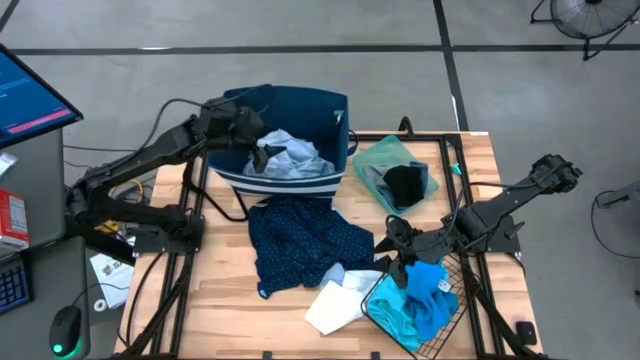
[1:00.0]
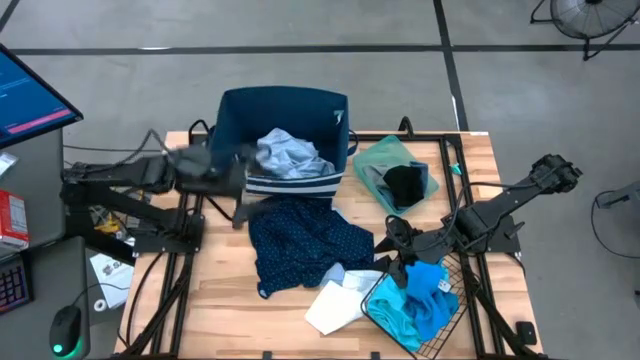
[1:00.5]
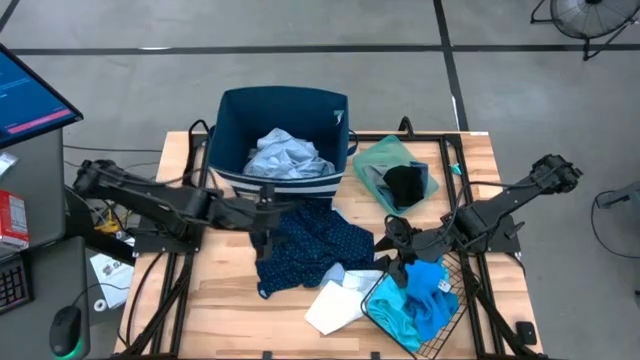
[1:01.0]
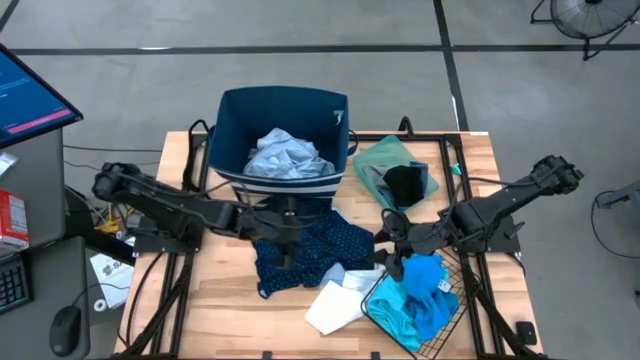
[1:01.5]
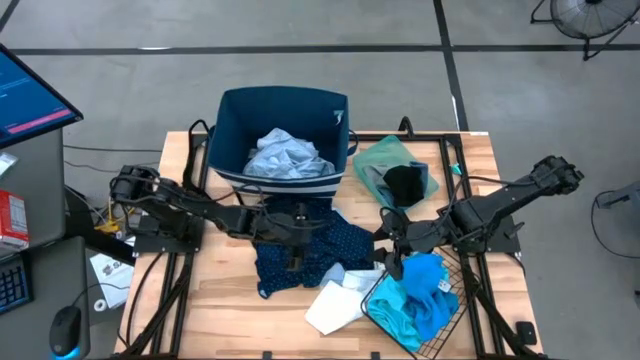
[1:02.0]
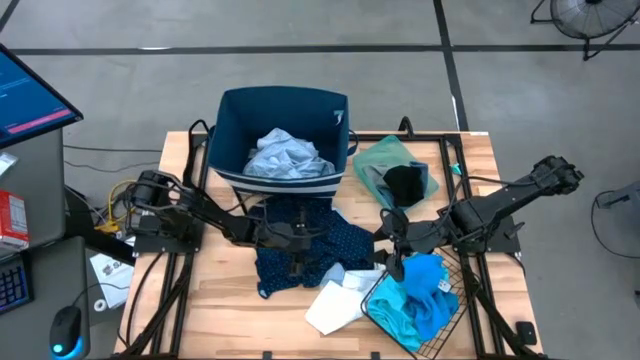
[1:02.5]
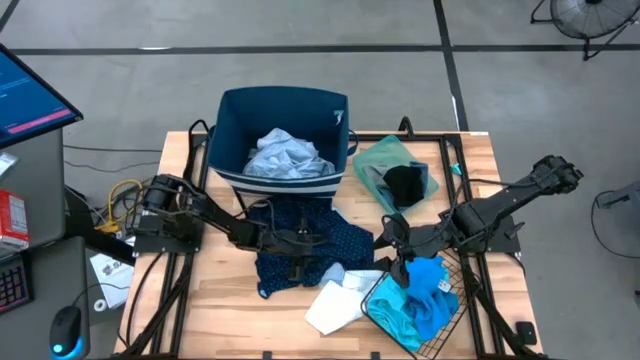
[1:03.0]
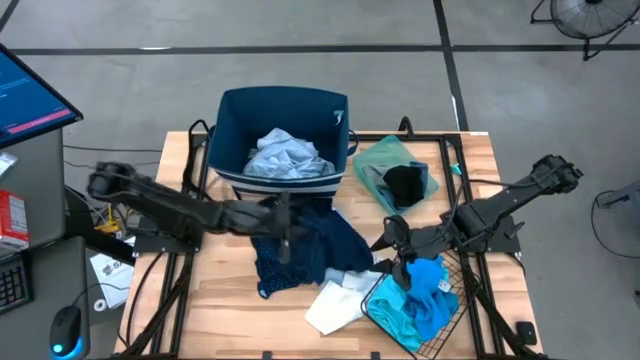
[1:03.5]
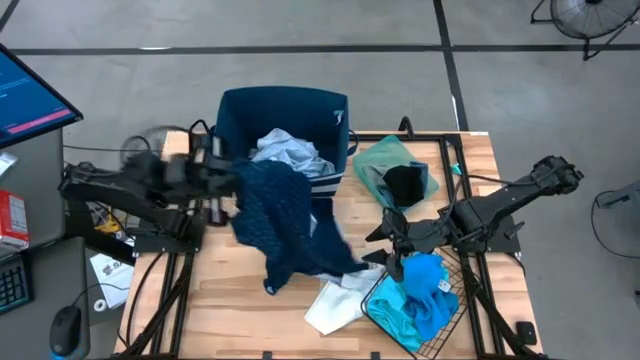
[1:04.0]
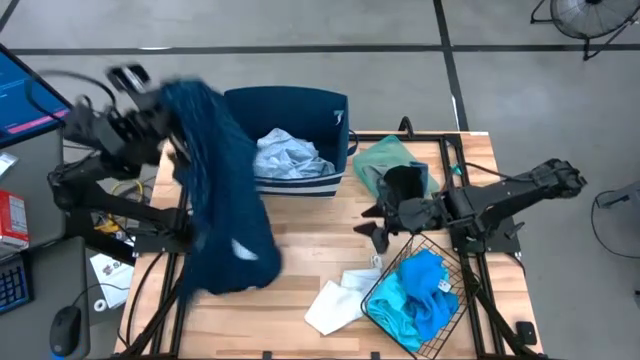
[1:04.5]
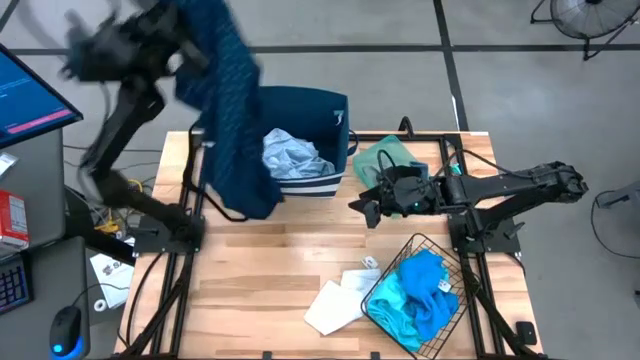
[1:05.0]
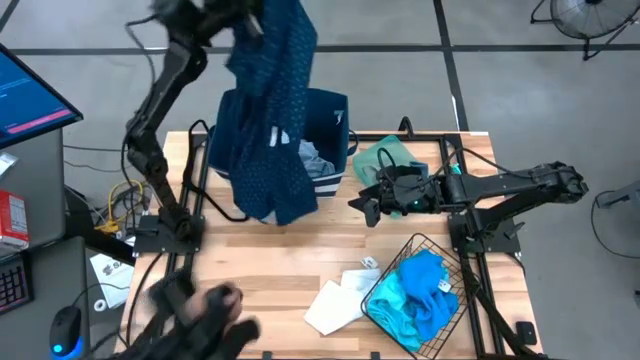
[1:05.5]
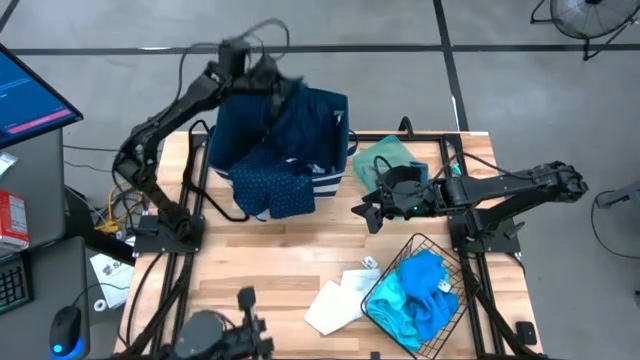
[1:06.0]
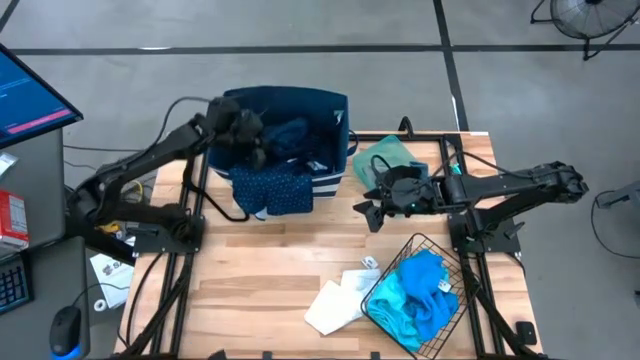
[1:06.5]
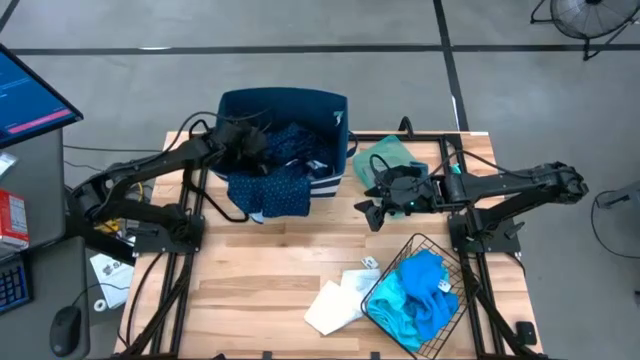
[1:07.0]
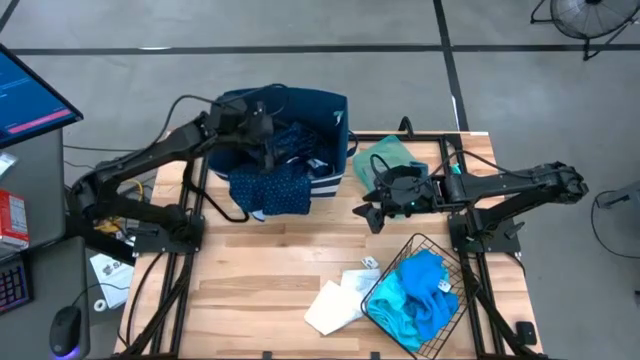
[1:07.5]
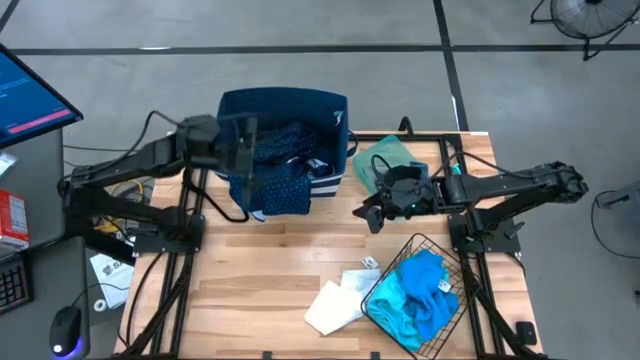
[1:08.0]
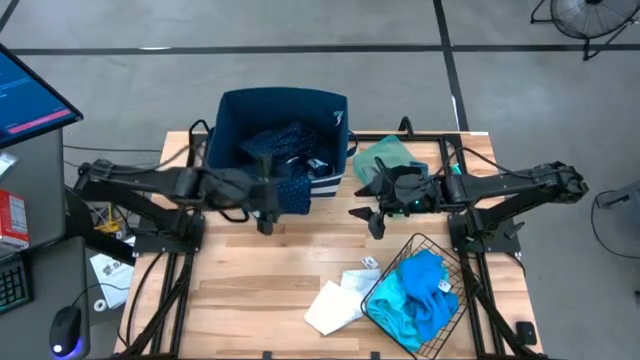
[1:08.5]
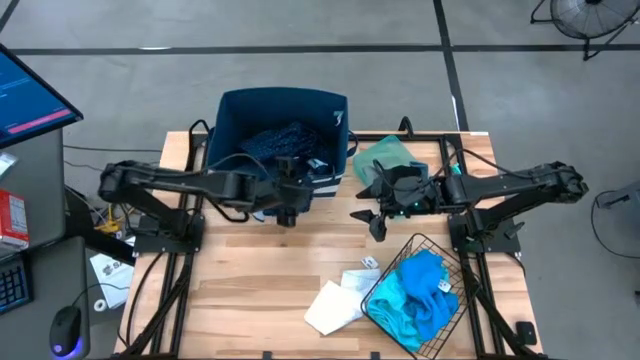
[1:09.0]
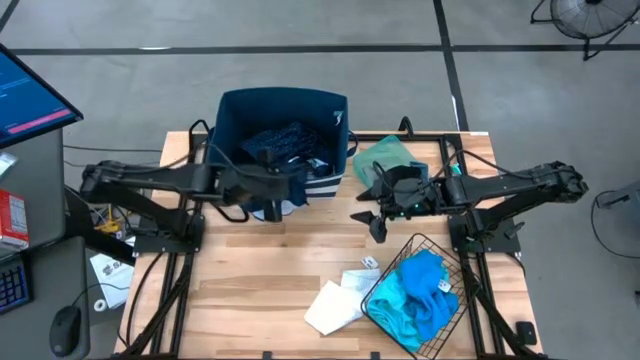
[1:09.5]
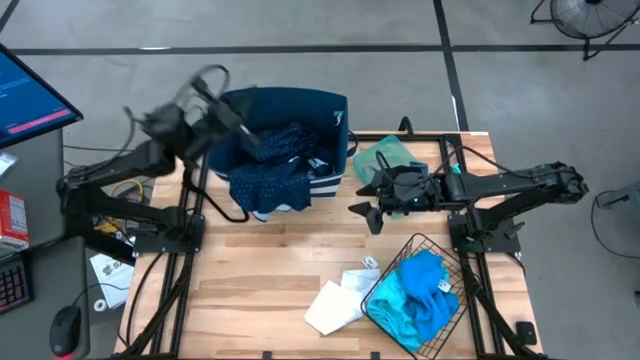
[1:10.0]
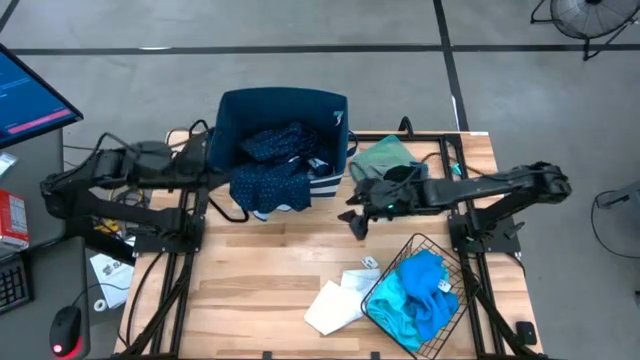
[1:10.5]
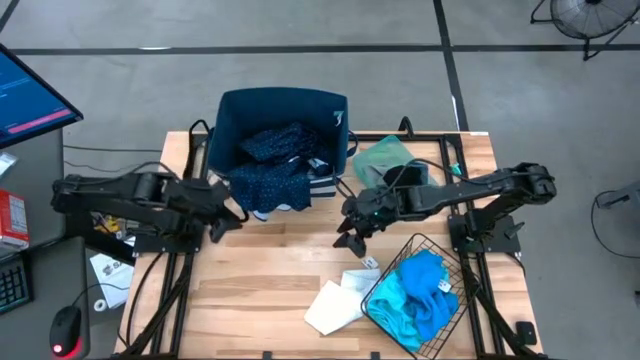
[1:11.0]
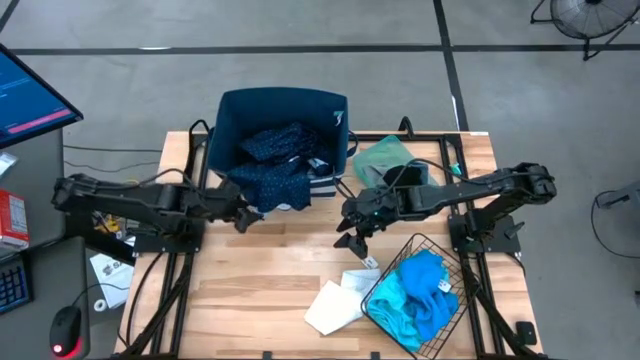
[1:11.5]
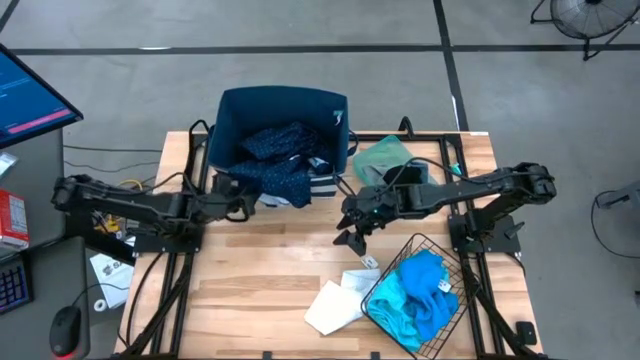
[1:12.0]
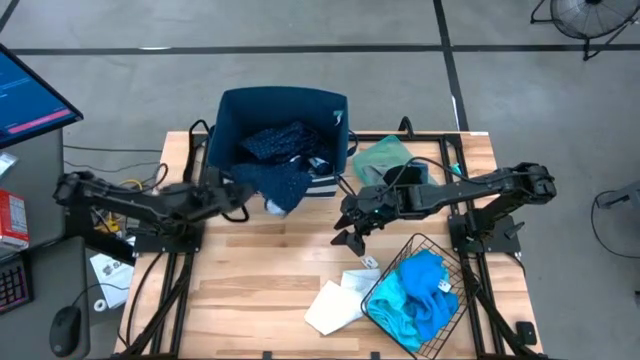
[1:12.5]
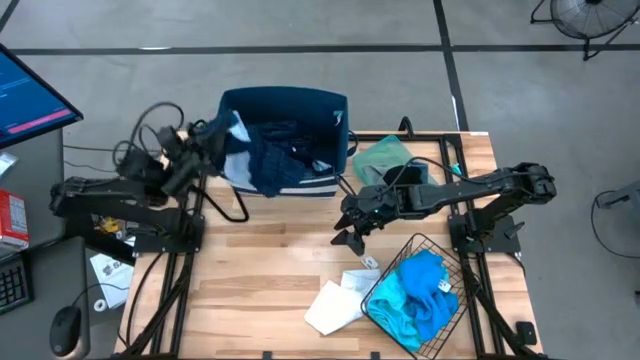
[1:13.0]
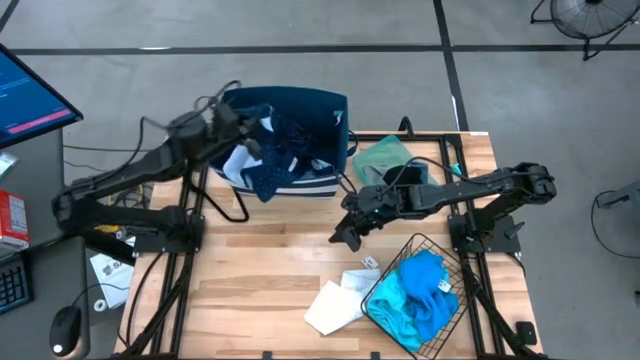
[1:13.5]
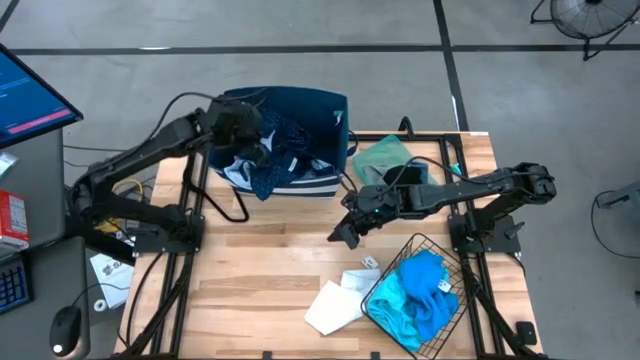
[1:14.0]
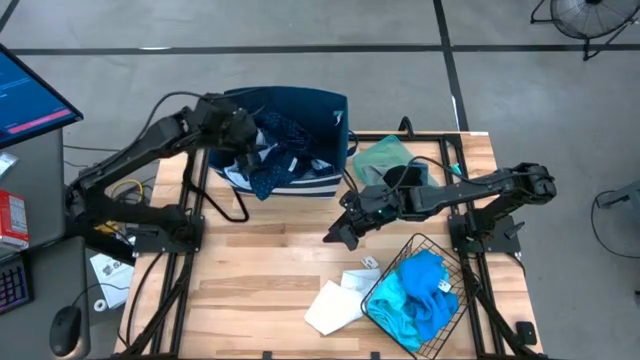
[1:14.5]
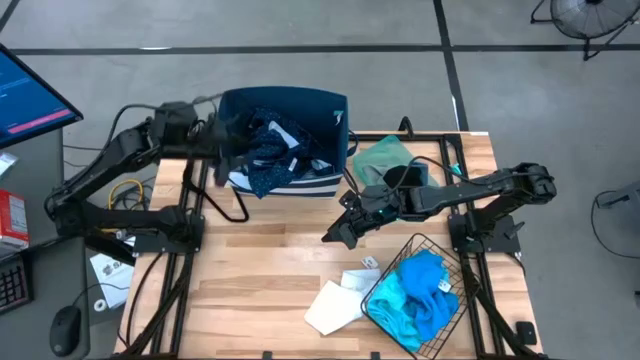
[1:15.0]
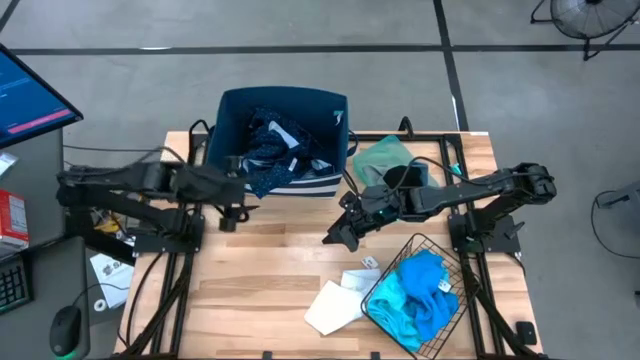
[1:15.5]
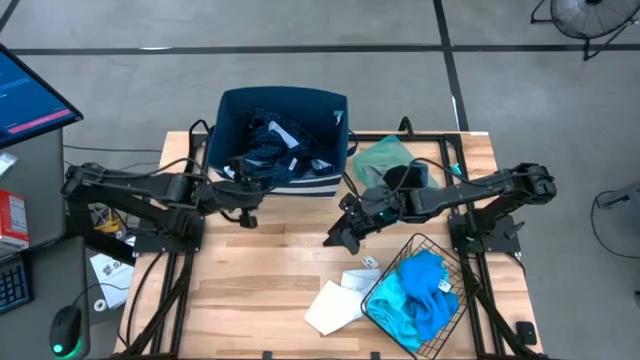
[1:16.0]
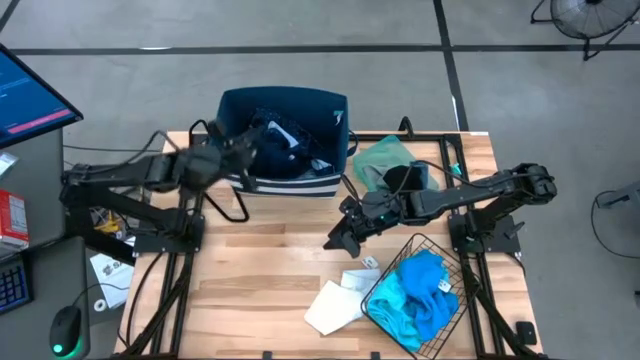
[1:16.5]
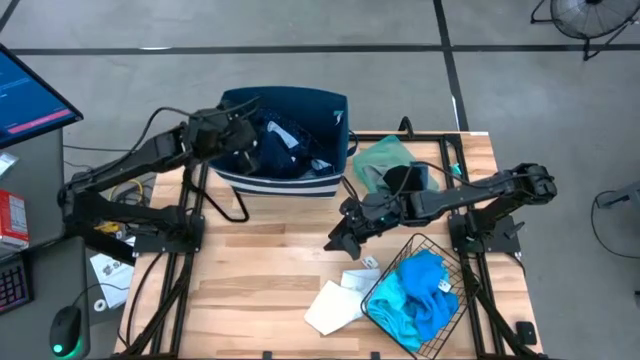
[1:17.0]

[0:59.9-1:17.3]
Task: Pick & Place Cloths
Put the dark blue patterned polo shirt into the blue laundry bin

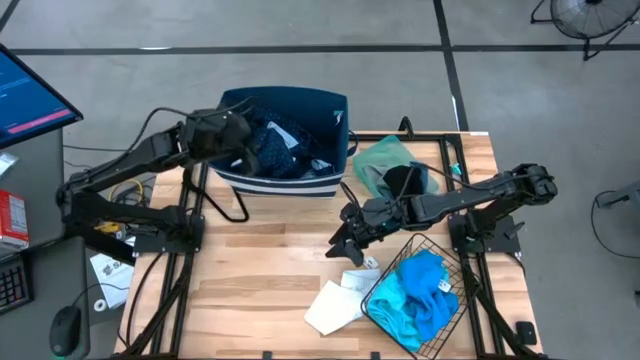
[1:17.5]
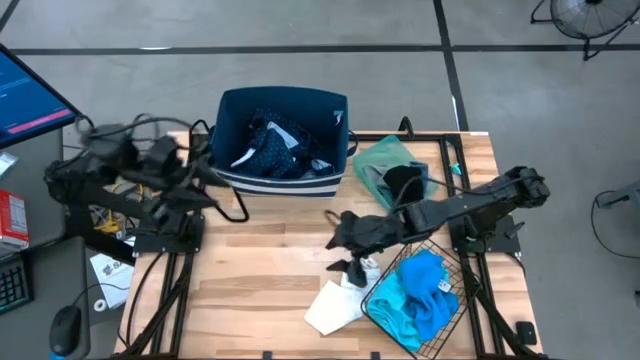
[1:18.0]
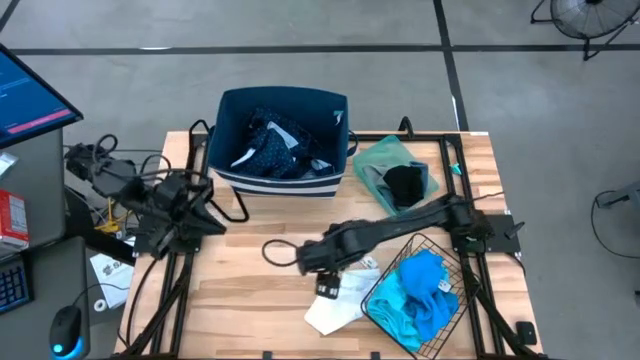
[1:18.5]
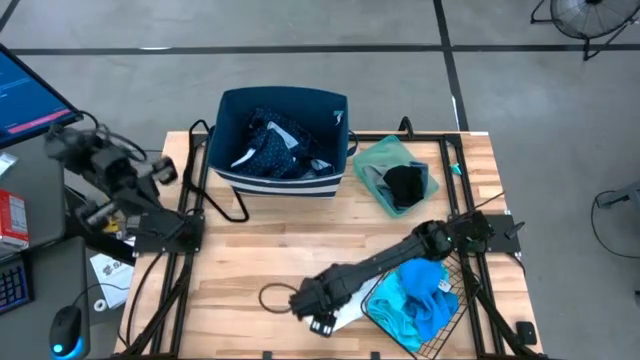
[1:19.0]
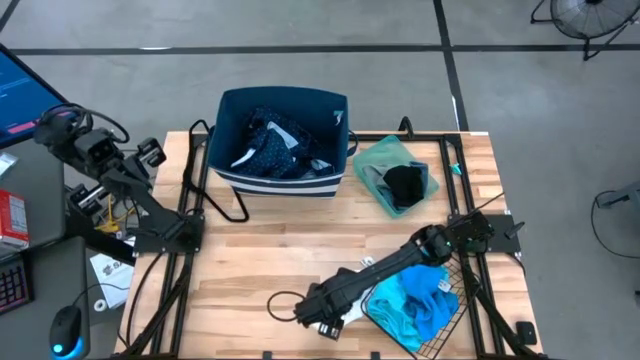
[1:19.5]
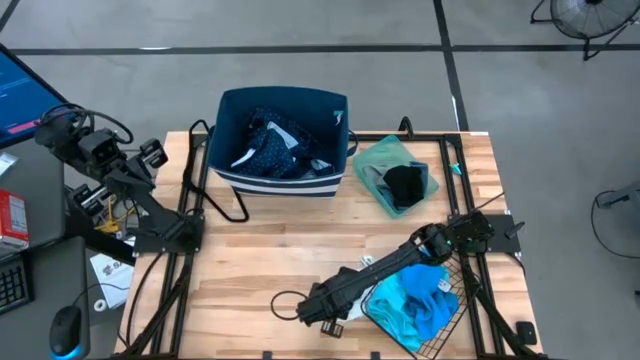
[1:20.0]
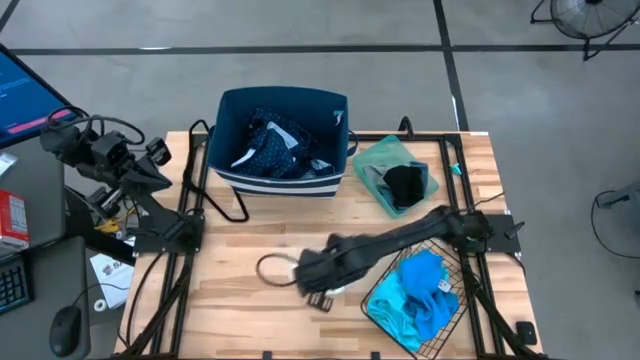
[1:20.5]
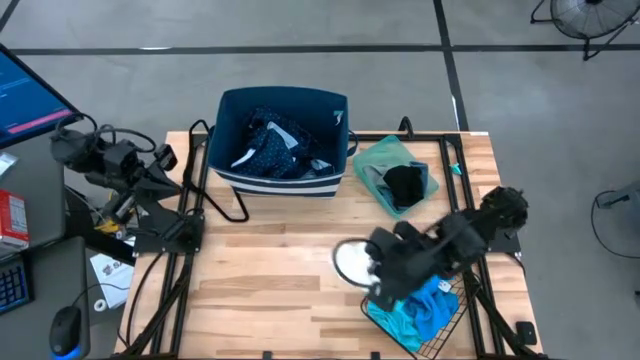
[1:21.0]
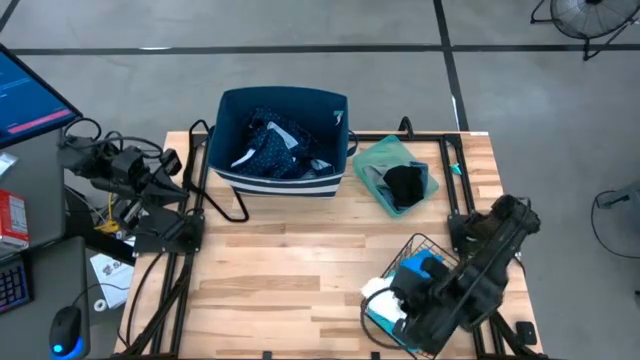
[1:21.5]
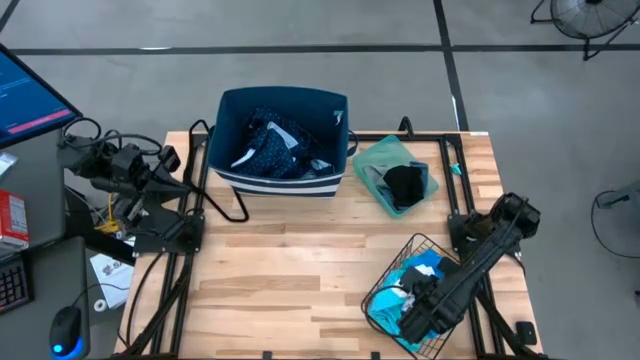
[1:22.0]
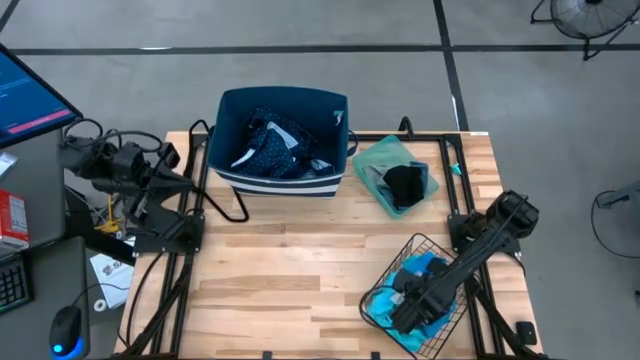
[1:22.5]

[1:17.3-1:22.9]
Put the white shorts into the black wire basket
